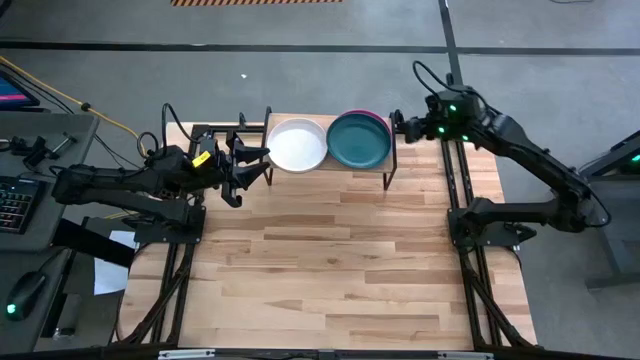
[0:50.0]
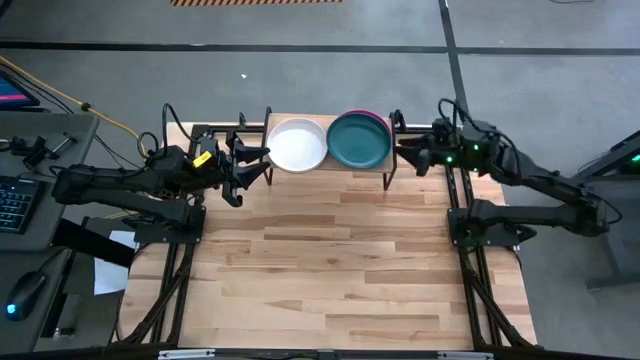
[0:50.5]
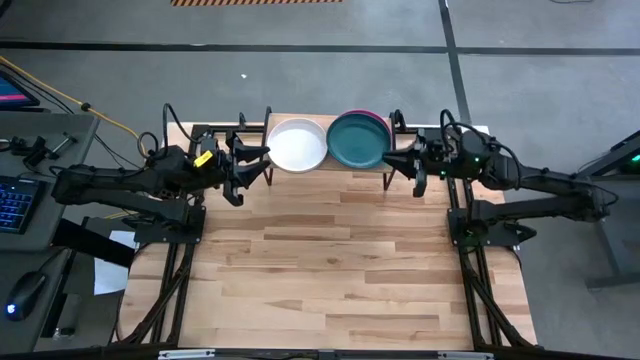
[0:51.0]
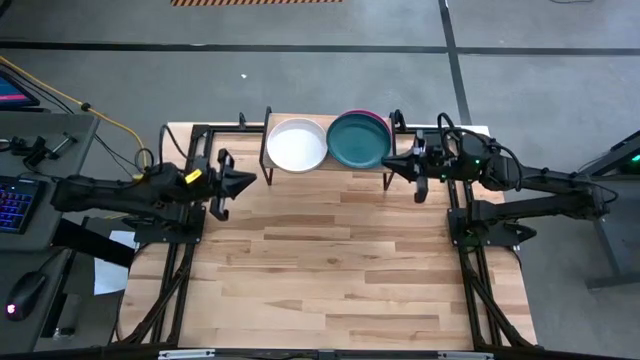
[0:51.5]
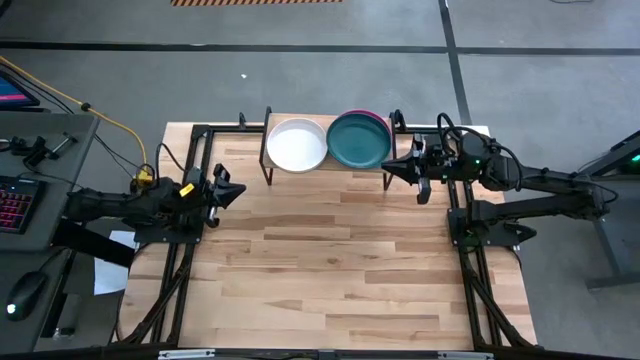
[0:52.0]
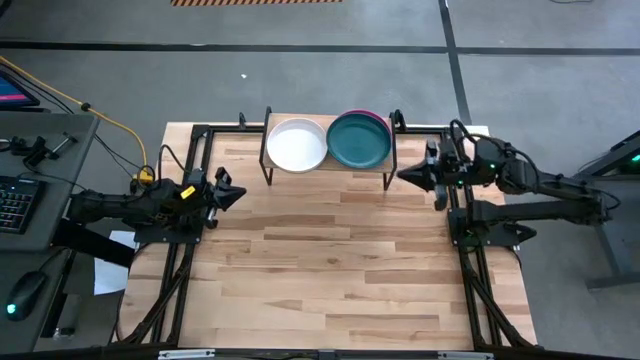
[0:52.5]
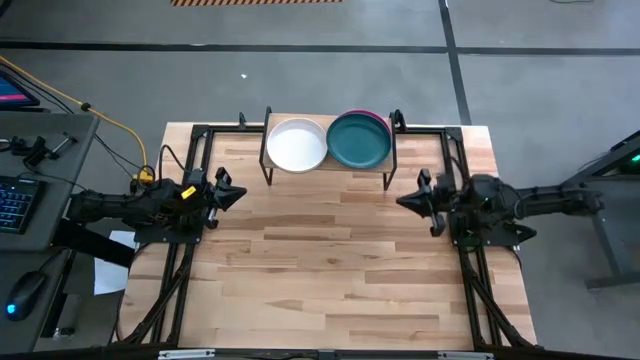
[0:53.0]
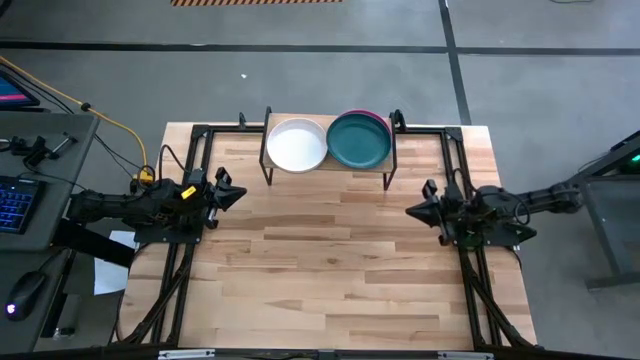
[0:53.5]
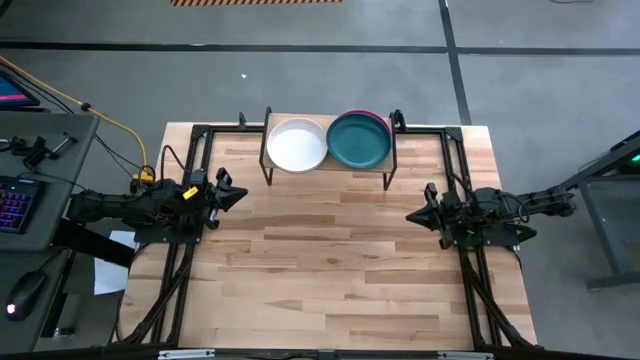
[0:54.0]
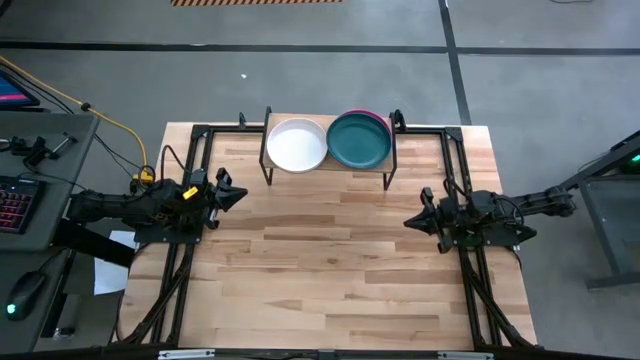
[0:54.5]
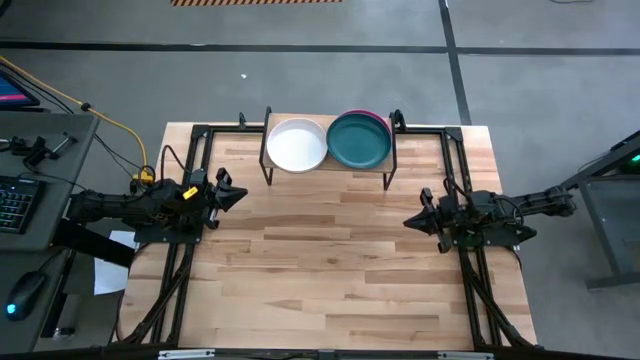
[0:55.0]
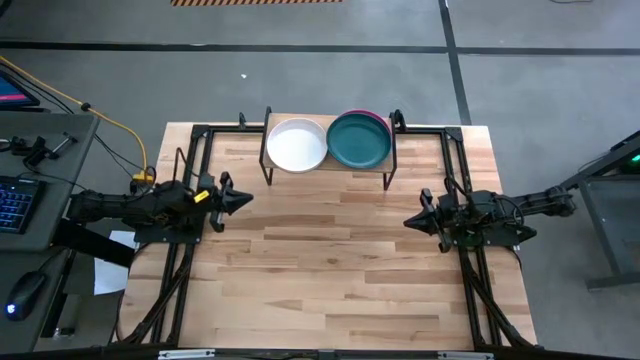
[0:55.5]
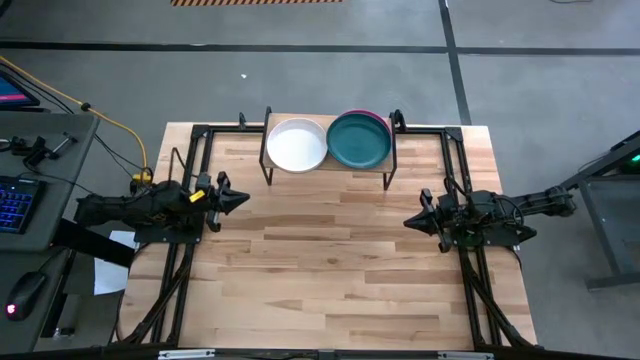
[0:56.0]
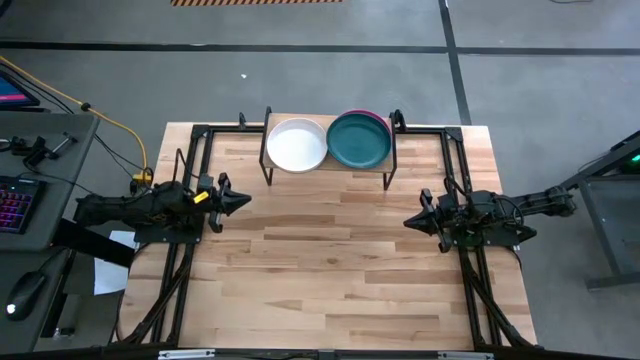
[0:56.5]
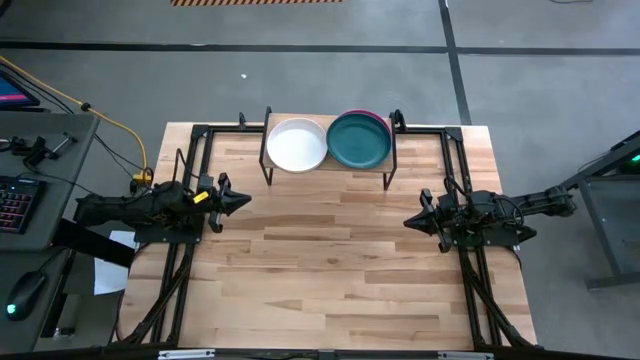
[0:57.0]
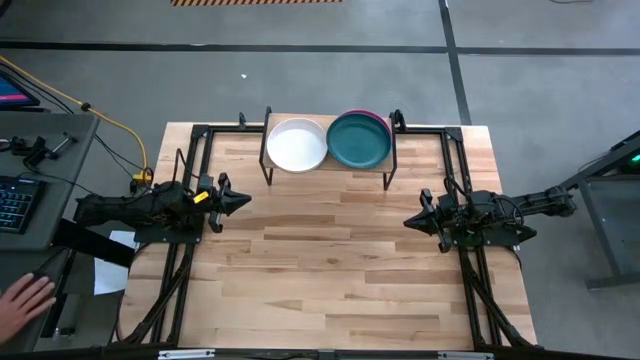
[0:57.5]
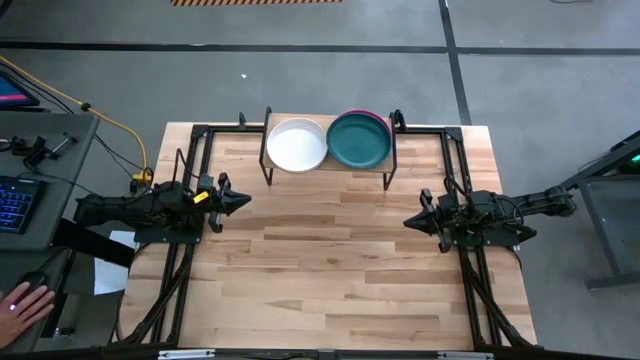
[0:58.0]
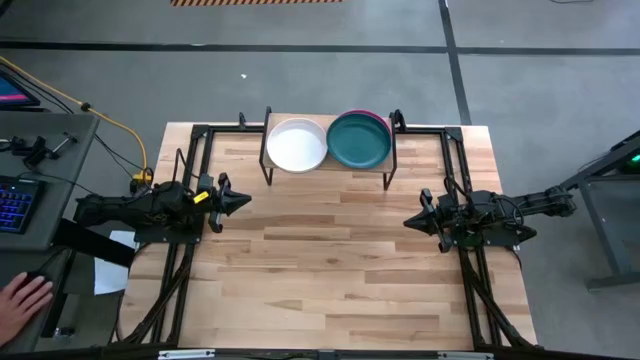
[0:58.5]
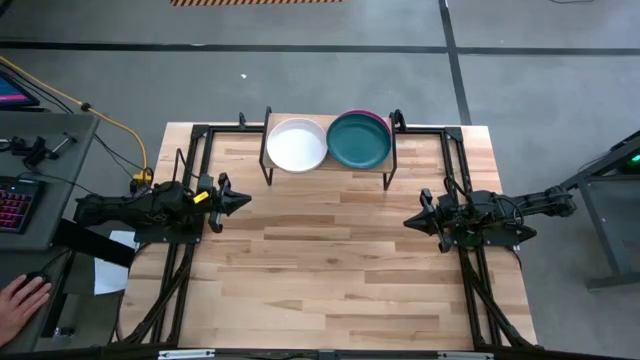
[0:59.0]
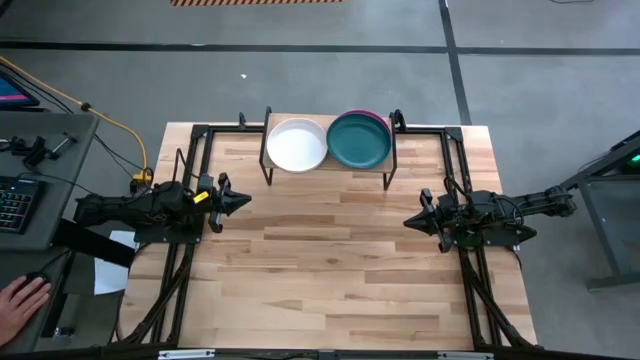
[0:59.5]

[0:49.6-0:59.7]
Task: Place and stack plates onto a shelf
Return to Home Position

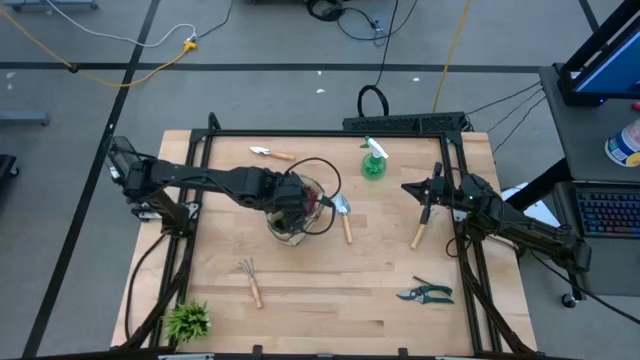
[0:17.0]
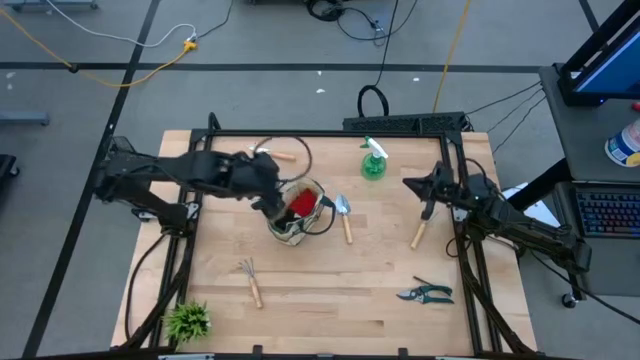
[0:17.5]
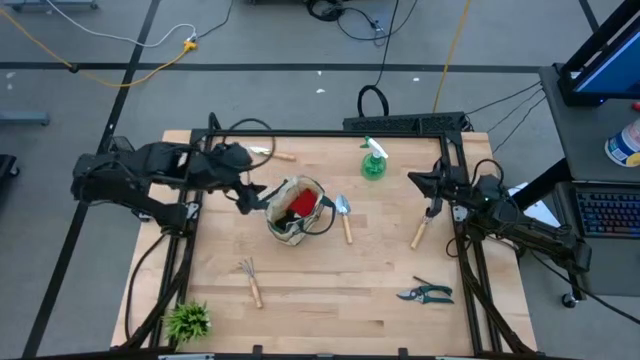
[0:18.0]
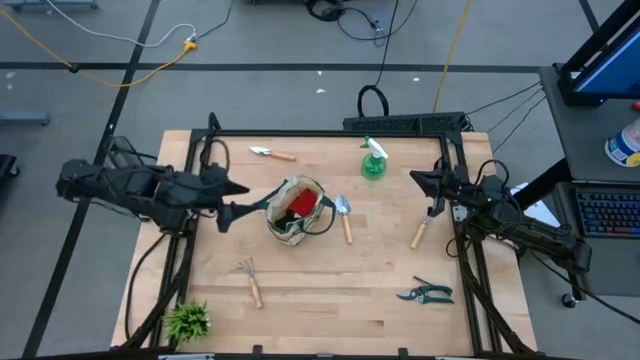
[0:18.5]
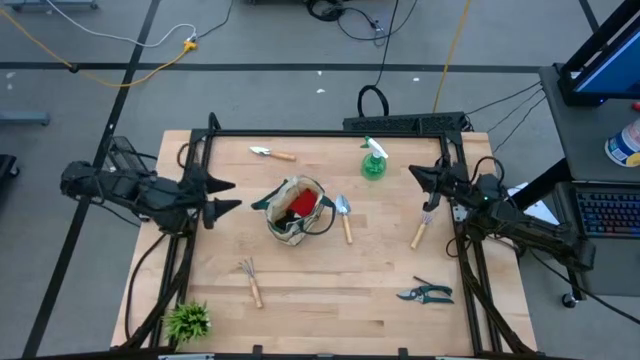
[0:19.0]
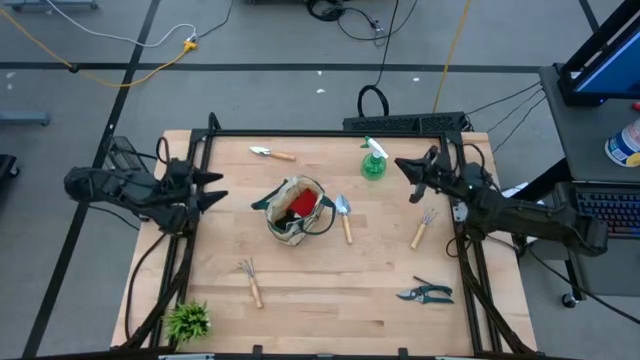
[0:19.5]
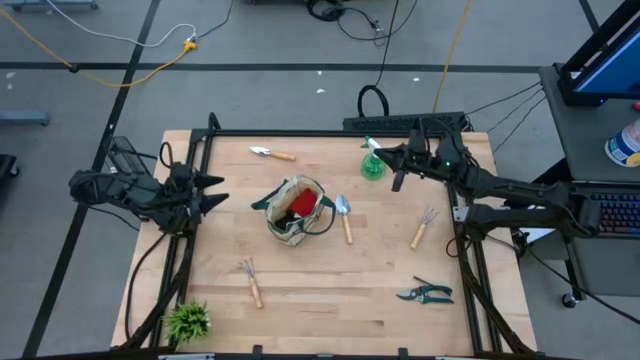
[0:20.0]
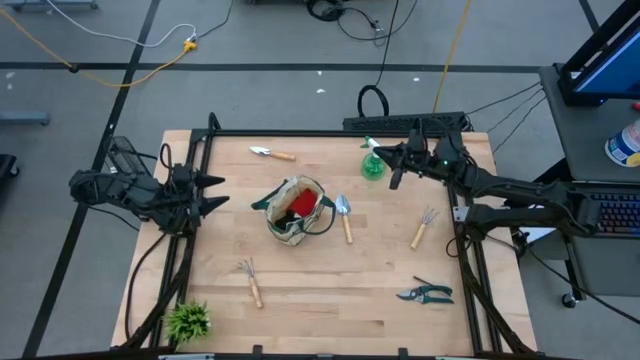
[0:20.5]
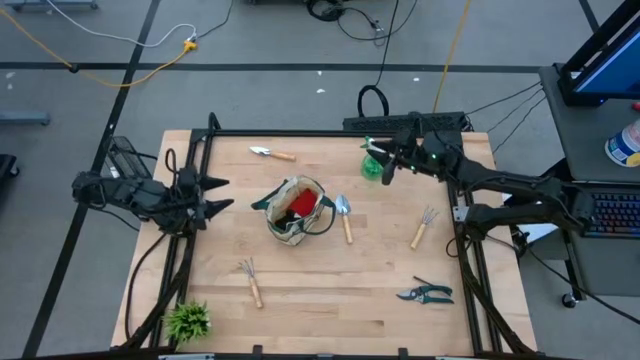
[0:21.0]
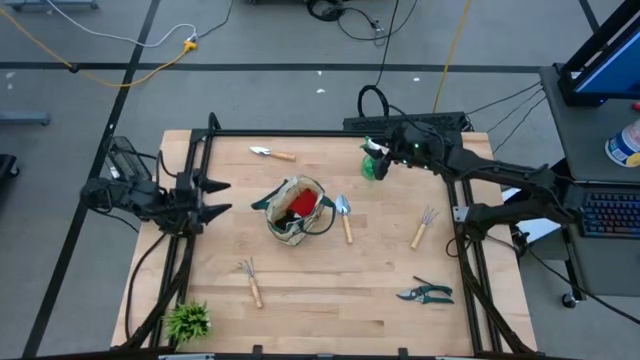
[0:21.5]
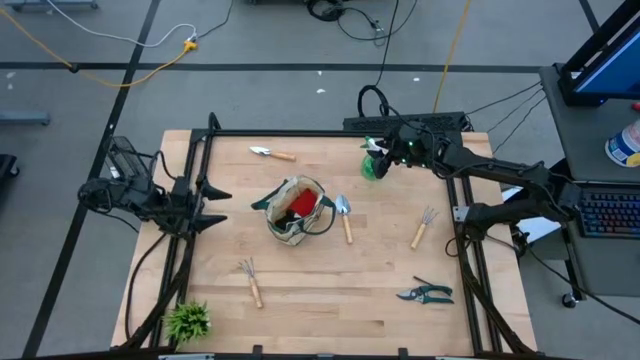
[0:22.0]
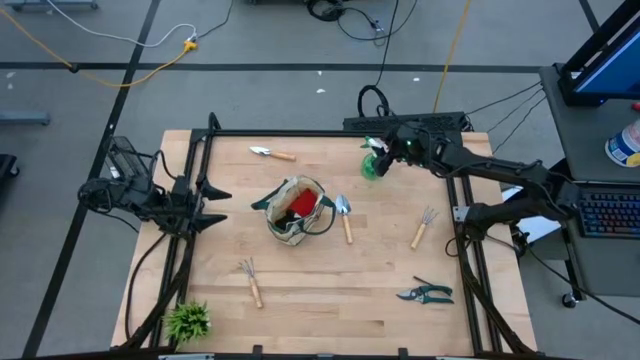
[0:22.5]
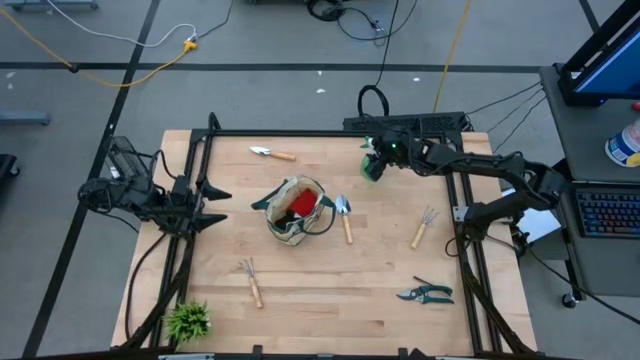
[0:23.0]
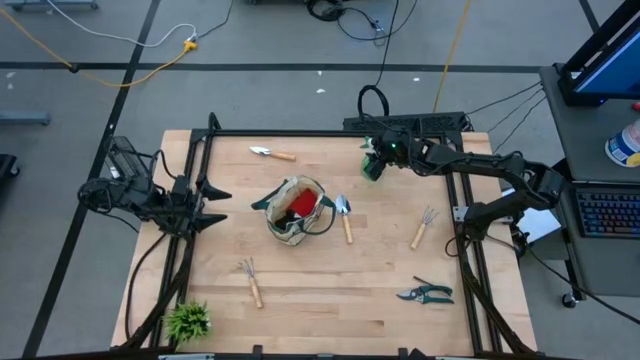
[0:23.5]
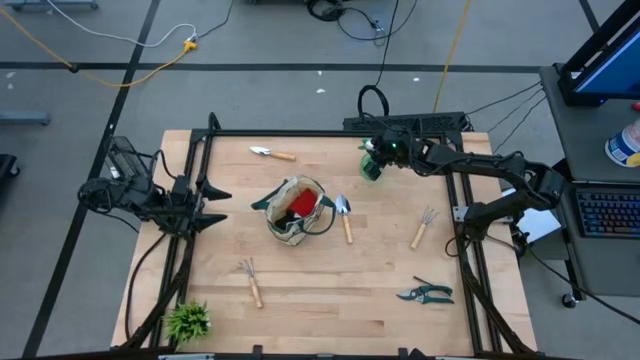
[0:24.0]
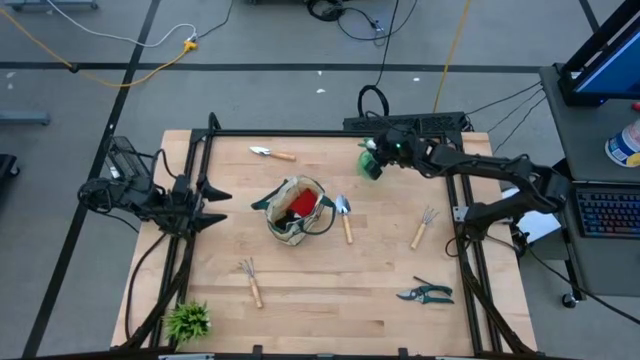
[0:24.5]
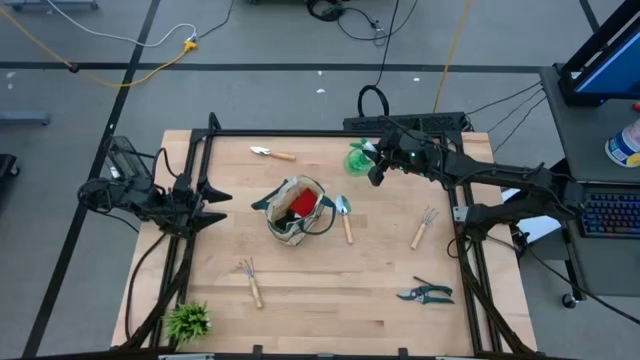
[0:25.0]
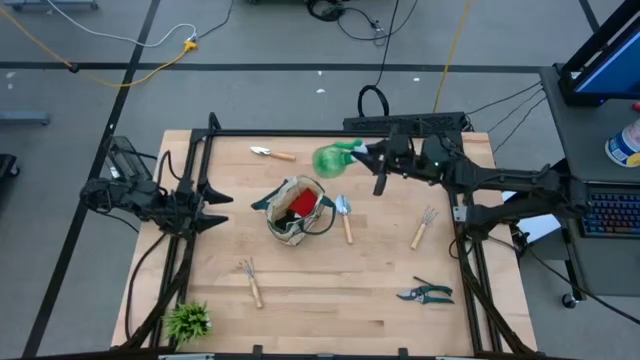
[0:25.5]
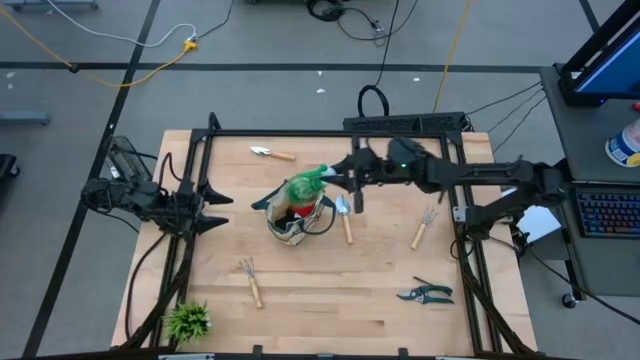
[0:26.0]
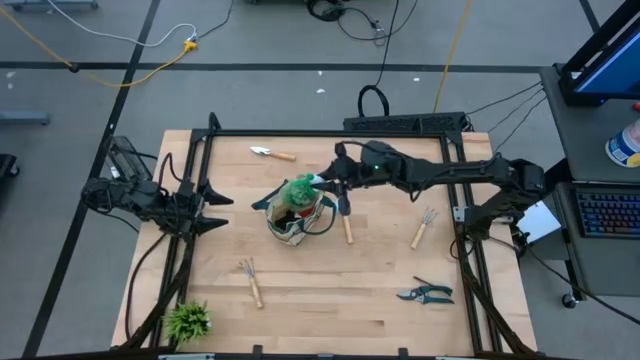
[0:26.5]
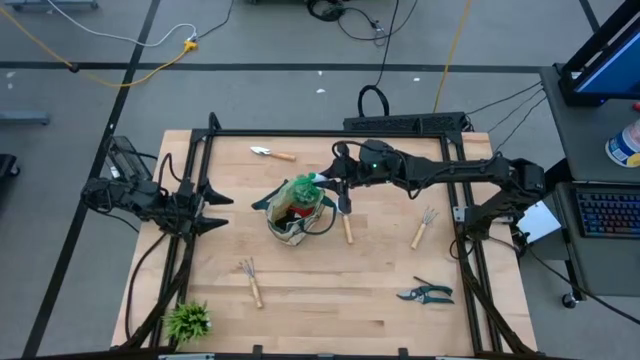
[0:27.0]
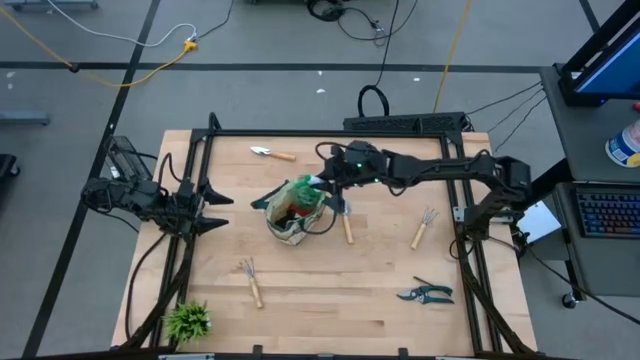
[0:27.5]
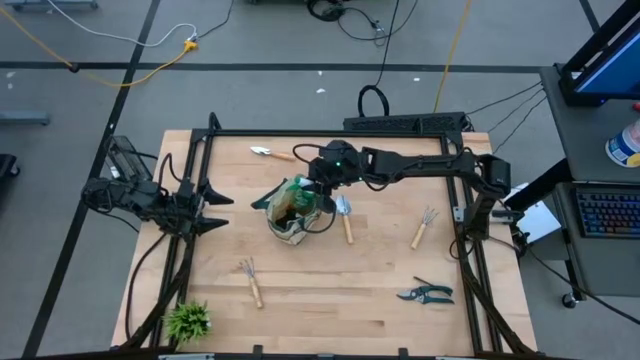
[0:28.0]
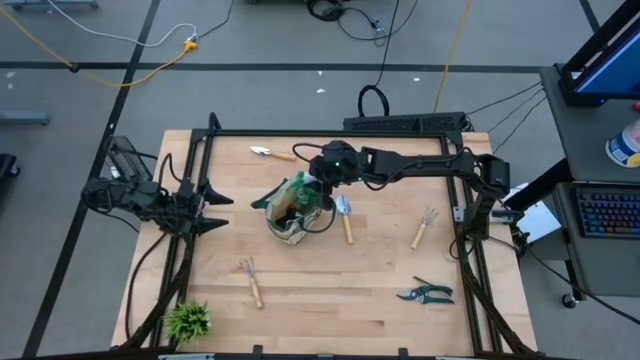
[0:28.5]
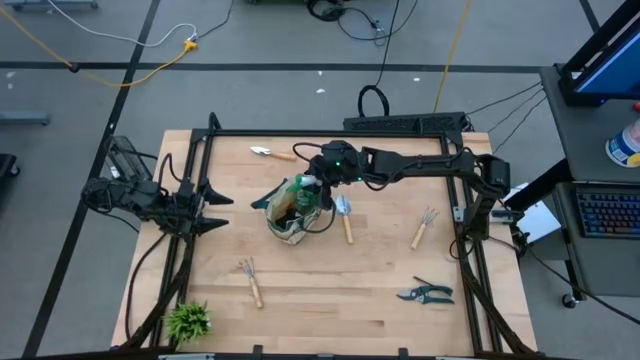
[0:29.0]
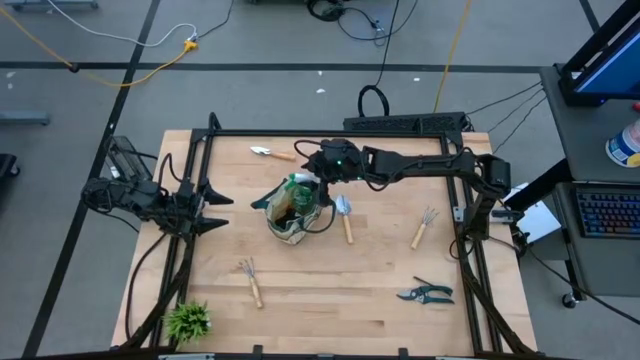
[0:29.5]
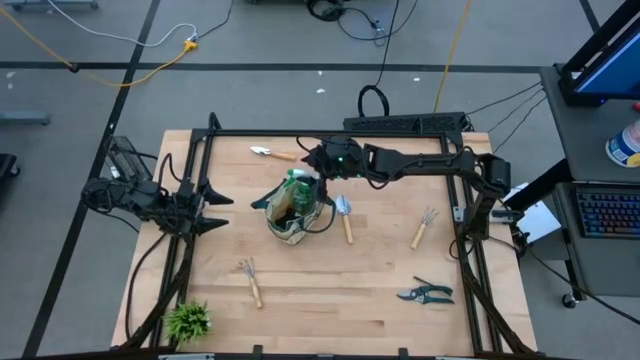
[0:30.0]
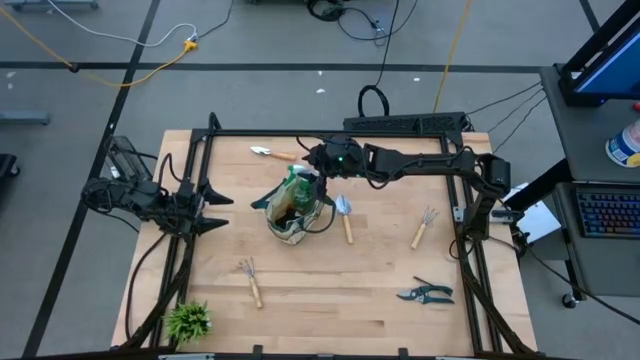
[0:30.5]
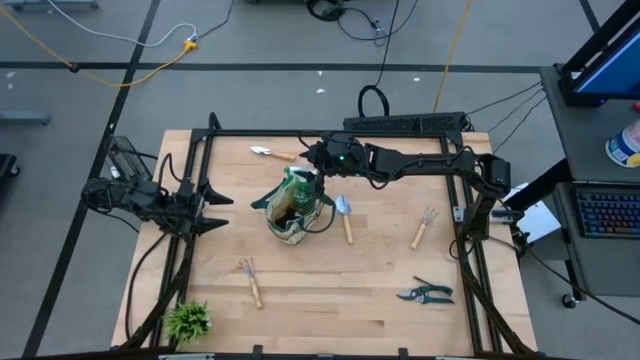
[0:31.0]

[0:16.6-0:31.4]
Task: Pick & Place Garden tools in Gardening bag
Put the green spray bottle into the green gardening bag
